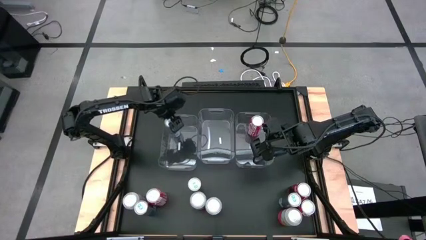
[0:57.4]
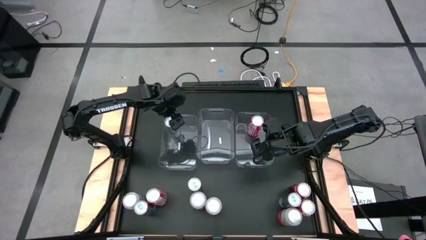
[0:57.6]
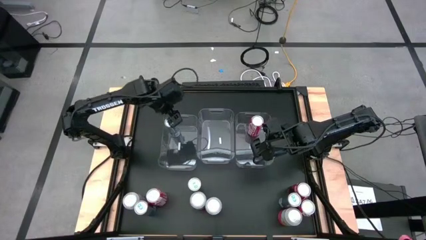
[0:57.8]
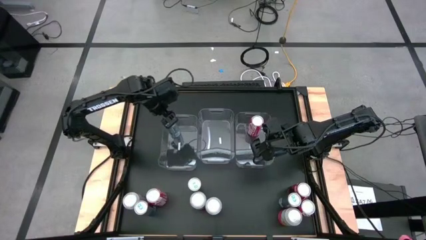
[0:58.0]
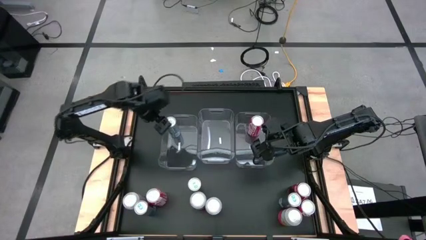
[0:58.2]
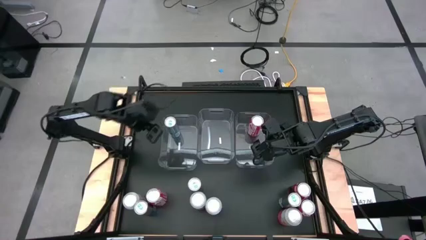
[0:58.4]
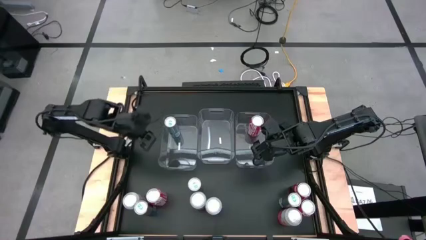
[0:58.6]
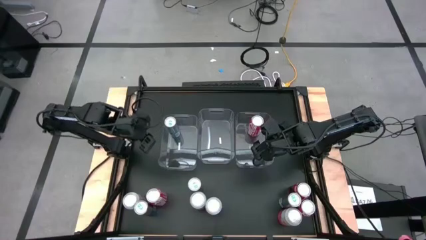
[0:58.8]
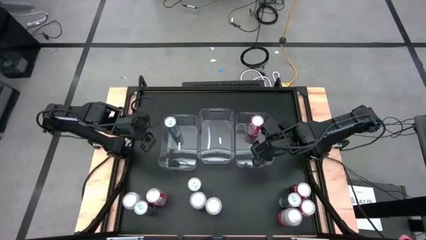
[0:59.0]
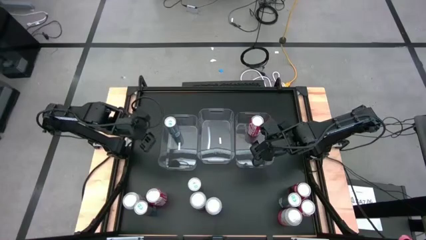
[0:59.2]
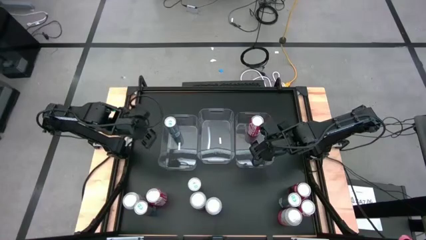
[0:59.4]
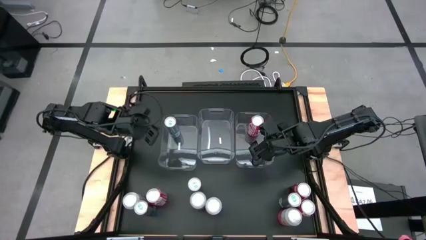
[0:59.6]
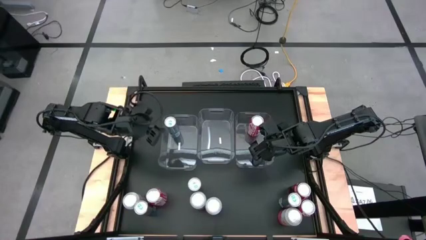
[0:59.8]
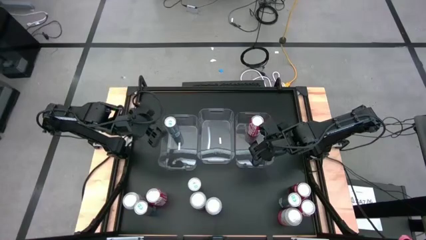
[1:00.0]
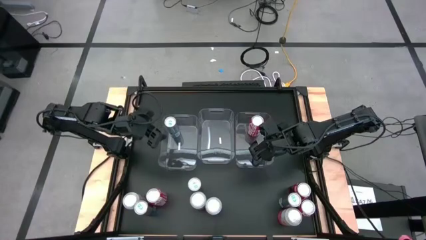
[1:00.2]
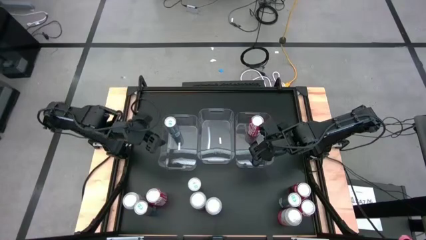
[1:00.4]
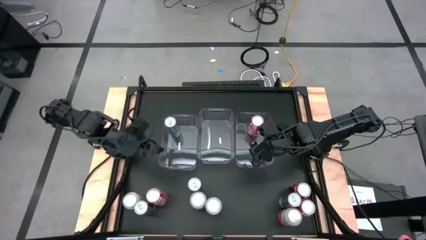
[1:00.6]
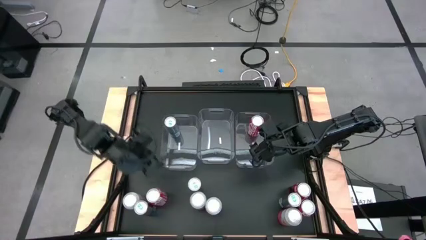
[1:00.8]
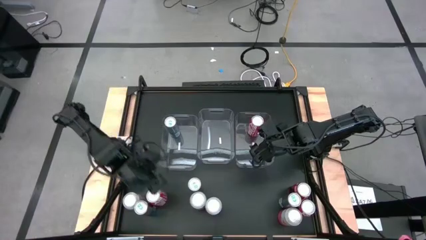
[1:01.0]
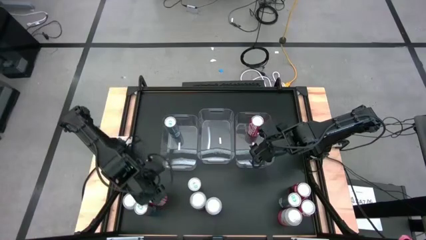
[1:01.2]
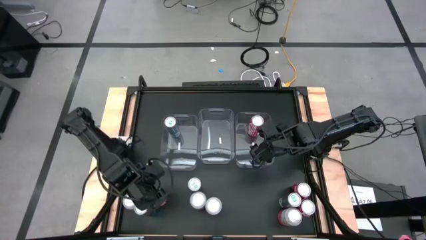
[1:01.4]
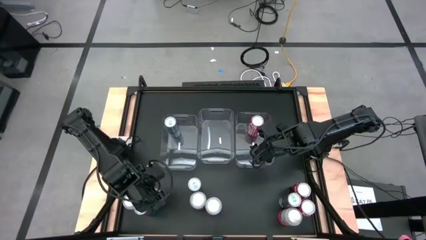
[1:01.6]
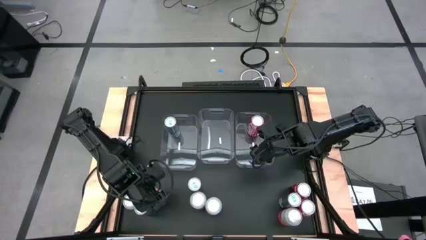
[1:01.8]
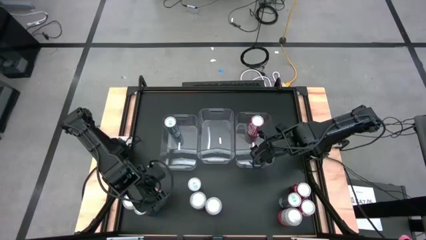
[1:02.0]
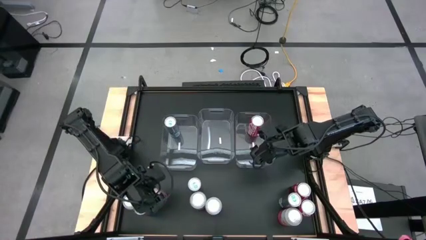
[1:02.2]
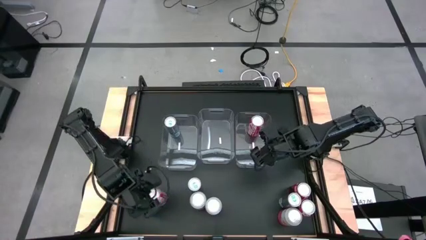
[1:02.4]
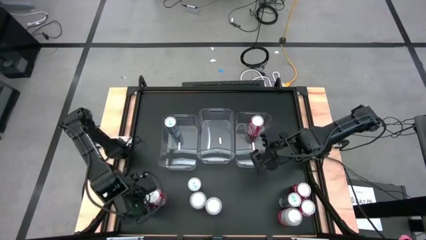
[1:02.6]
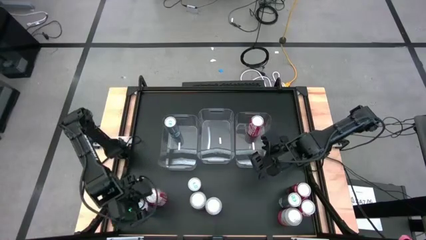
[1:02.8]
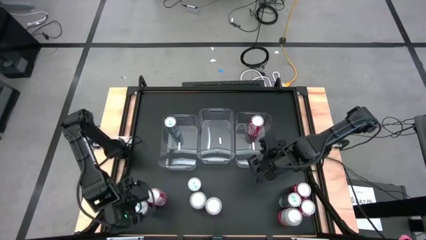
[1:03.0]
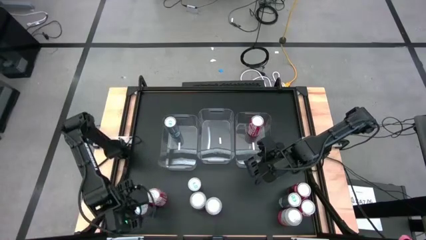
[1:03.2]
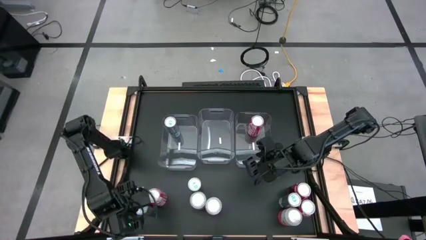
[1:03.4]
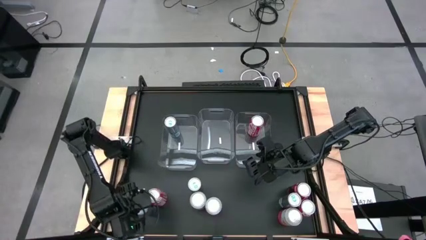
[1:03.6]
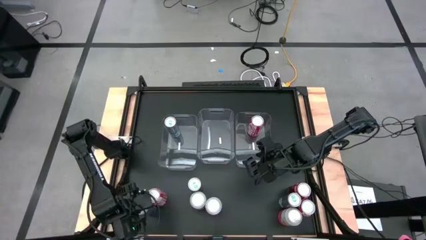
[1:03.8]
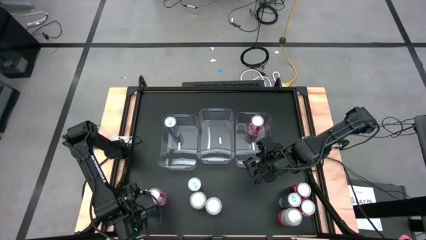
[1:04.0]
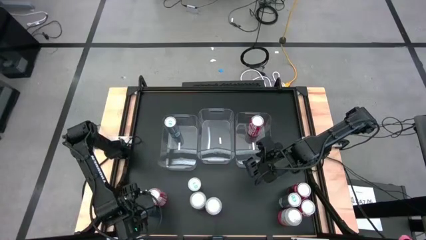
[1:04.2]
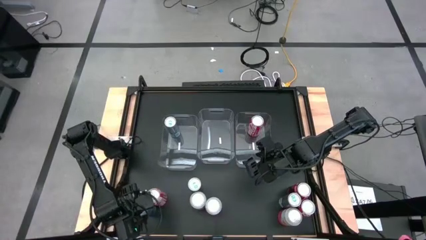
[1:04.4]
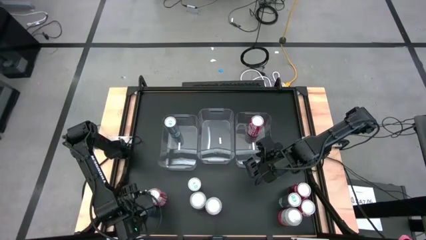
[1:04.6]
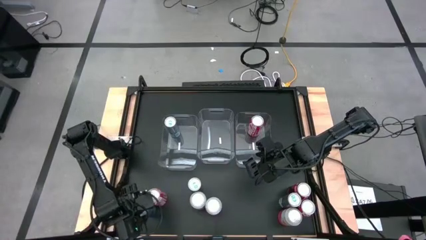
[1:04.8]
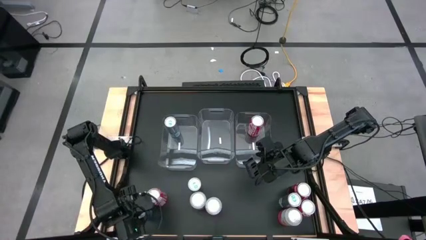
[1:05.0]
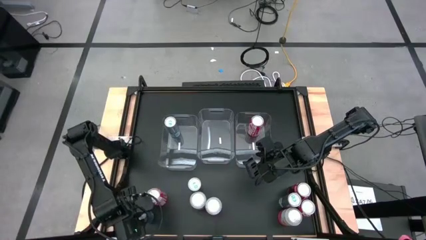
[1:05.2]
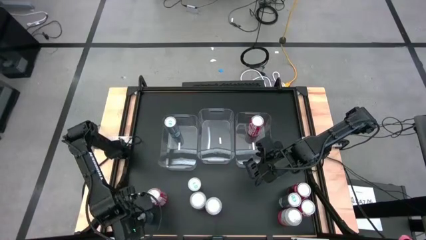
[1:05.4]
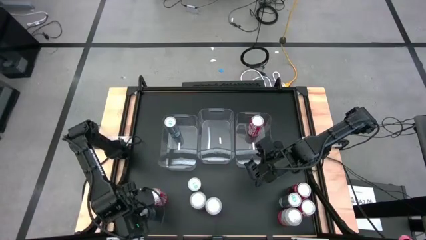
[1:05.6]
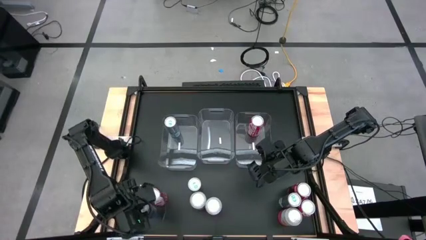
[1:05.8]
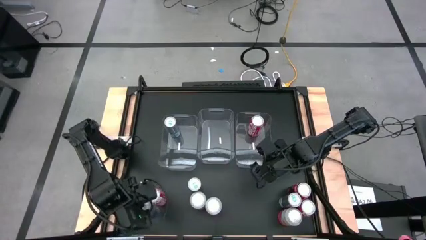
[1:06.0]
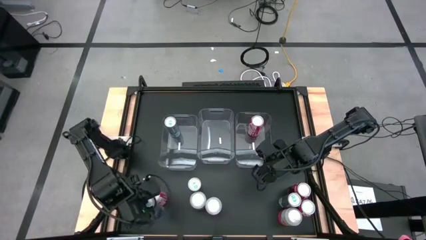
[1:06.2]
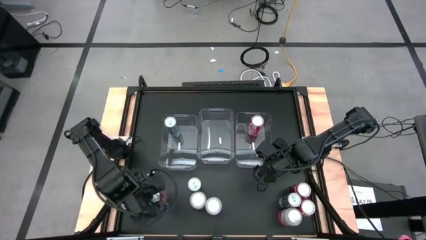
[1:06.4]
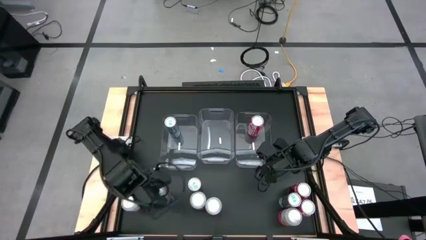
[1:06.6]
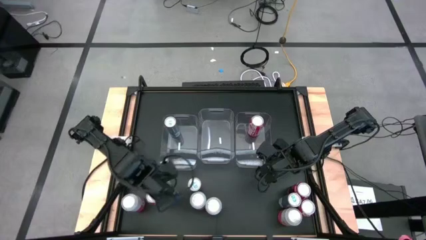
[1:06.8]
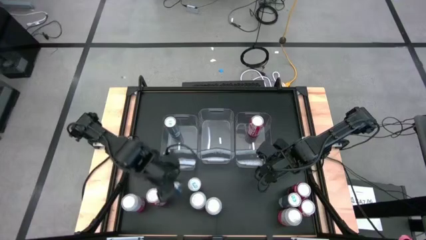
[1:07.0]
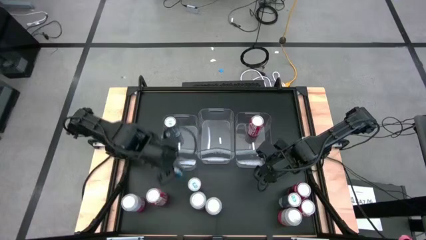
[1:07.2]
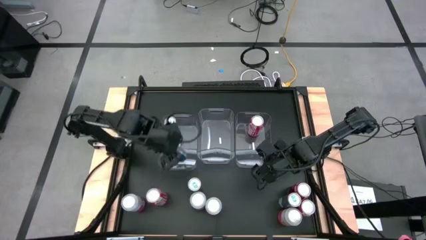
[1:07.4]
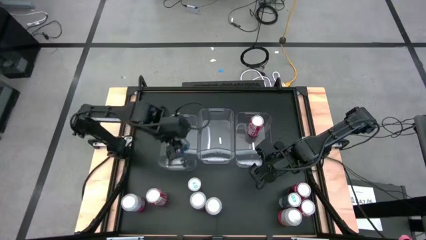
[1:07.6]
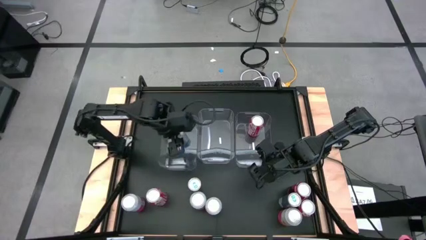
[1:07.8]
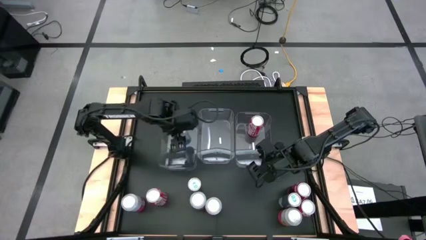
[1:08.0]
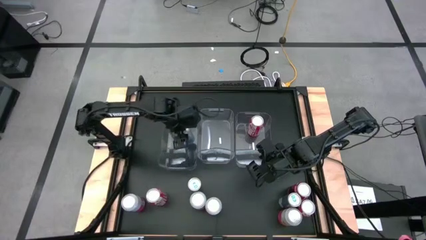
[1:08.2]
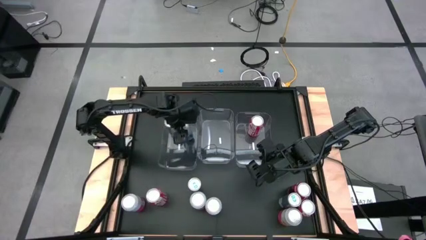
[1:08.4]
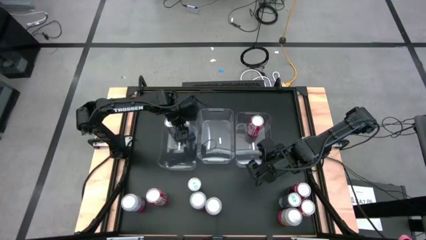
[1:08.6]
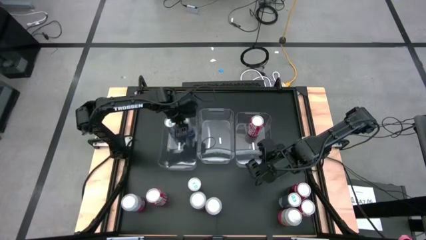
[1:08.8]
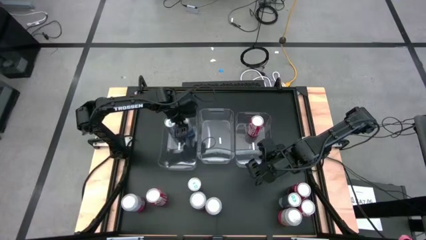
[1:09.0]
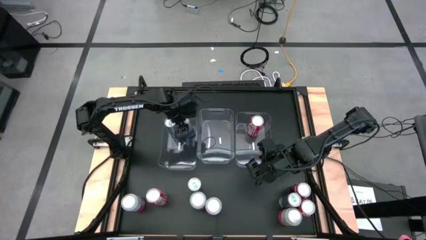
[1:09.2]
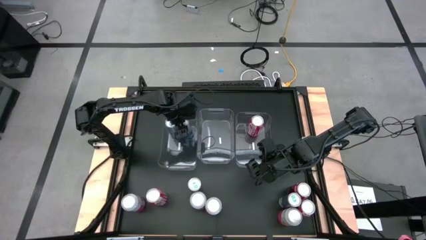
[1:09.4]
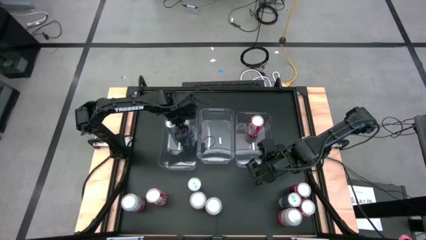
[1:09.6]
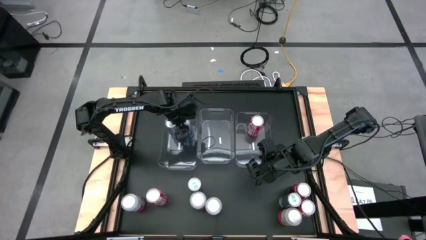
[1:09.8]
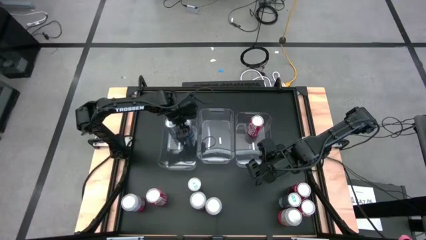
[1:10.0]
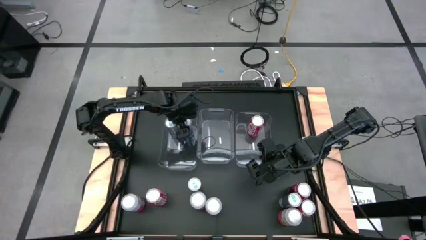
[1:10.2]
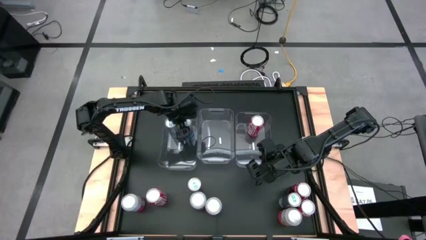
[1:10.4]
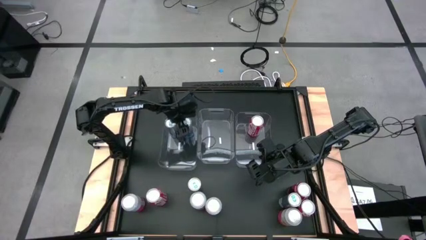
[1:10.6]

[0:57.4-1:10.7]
Task: Sort soda cans
Put the bottom left blue soda can into the left transparent bin

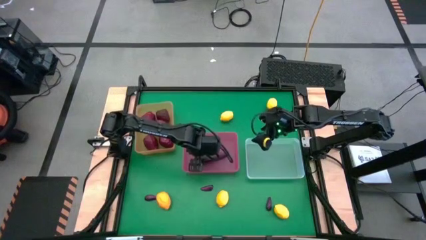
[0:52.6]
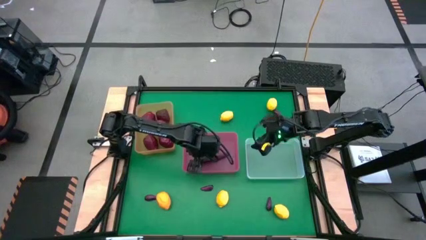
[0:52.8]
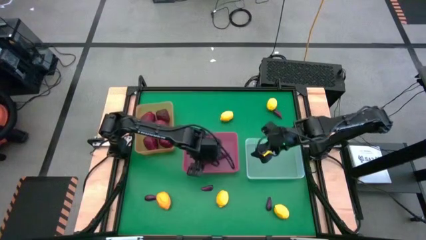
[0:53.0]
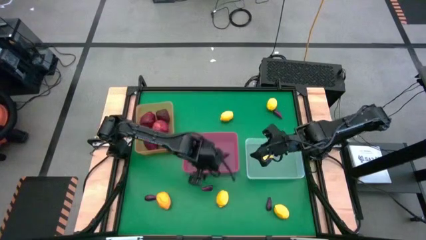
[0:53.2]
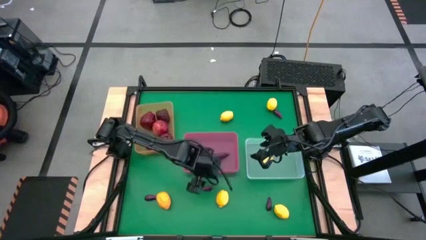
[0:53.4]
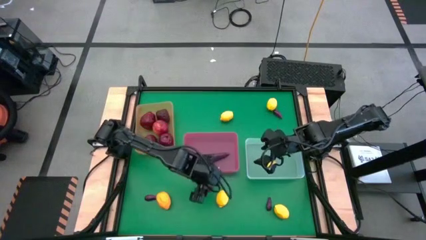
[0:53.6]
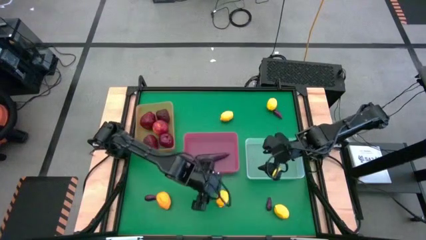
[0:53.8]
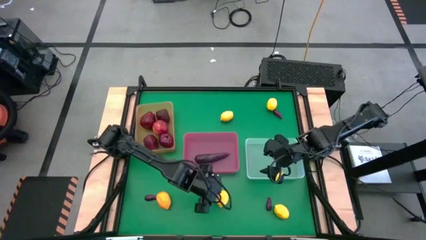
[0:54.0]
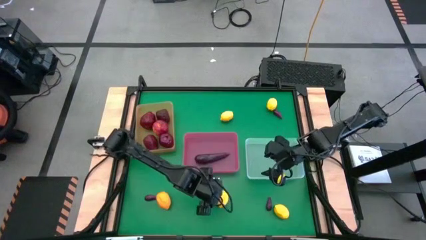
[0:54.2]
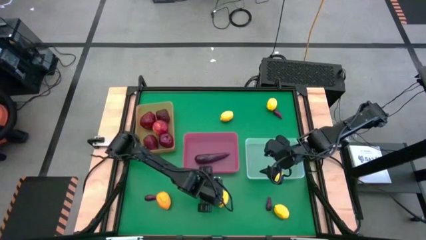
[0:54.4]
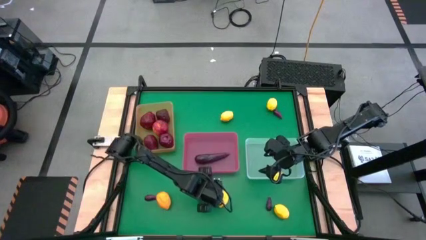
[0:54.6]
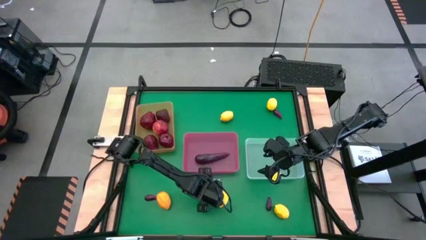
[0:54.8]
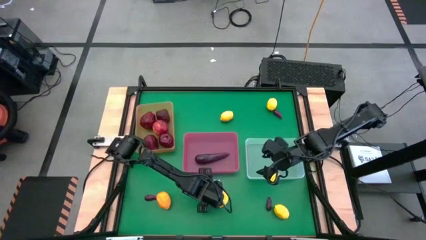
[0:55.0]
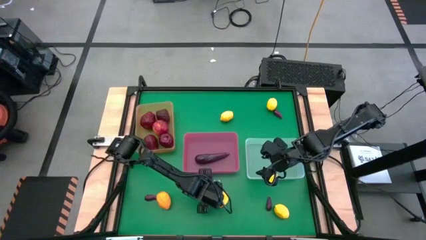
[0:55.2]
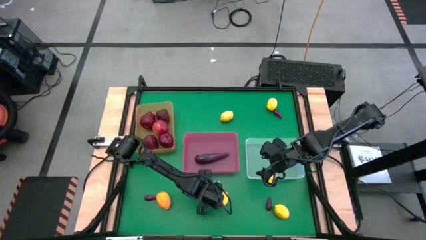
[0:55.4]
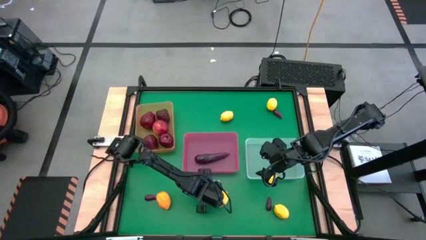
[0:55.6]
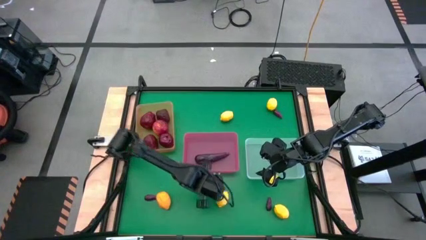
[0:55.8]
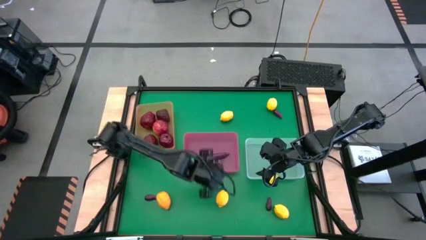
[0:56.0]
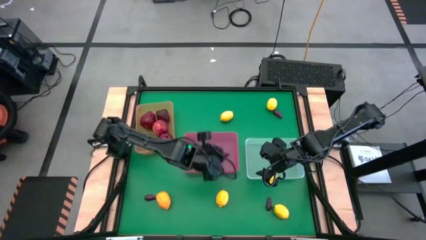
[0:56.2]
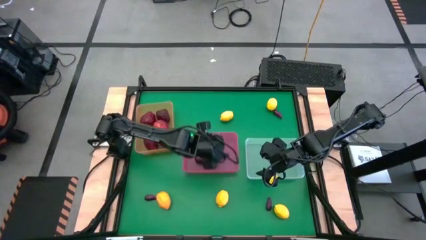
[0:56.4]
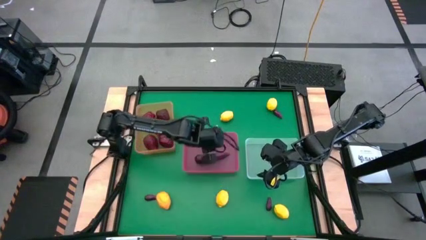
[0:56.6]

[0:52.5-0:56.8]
Task: Sort produce into baskets
Put the violet eggplant into the pink bin
